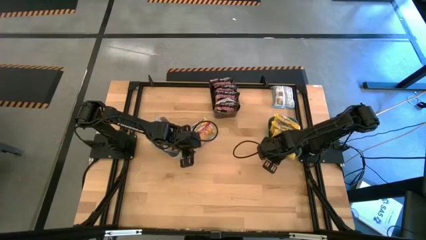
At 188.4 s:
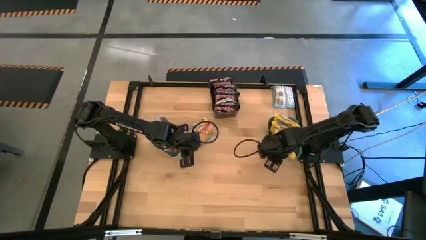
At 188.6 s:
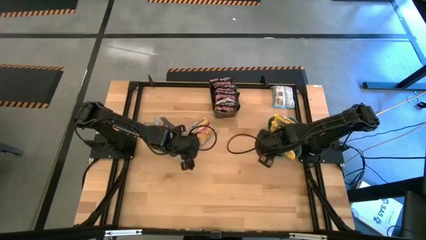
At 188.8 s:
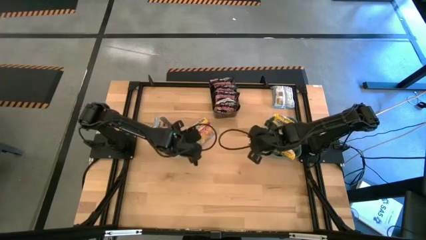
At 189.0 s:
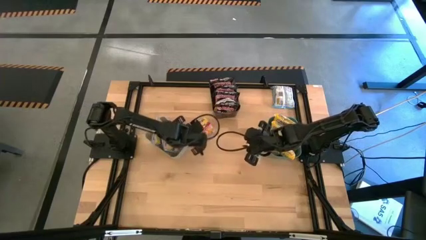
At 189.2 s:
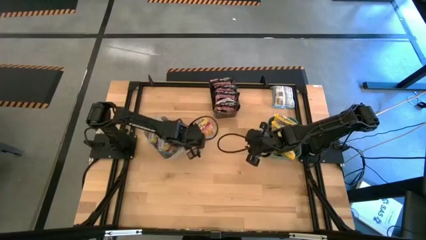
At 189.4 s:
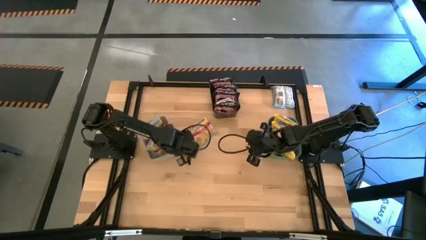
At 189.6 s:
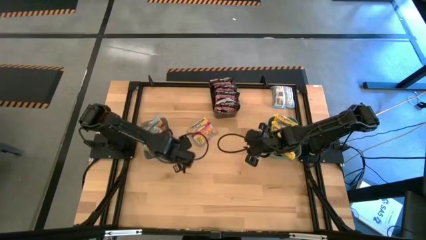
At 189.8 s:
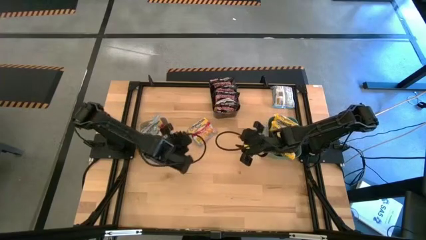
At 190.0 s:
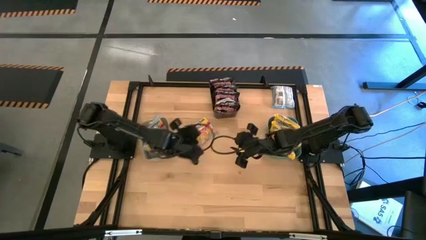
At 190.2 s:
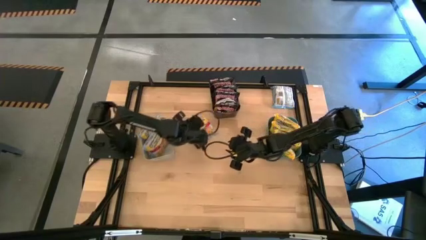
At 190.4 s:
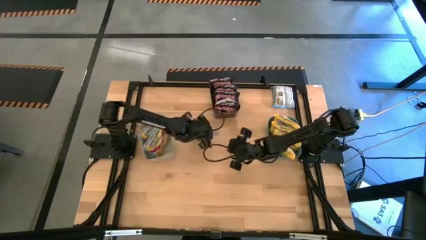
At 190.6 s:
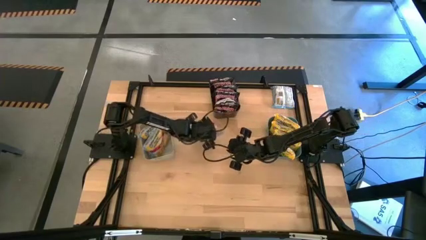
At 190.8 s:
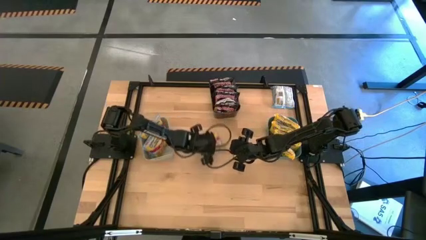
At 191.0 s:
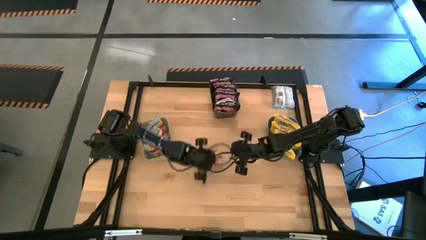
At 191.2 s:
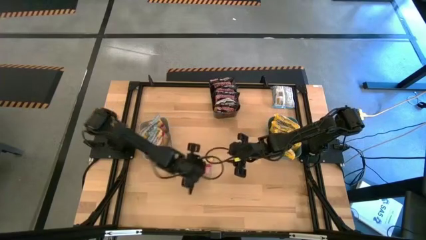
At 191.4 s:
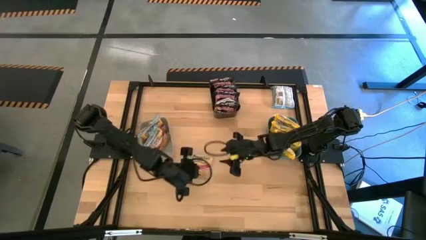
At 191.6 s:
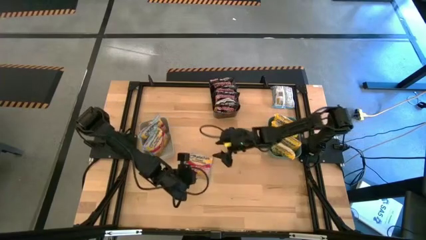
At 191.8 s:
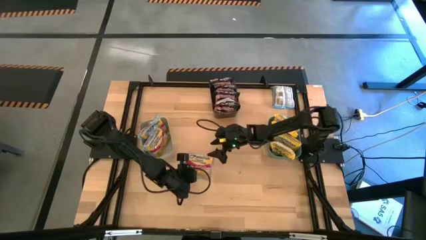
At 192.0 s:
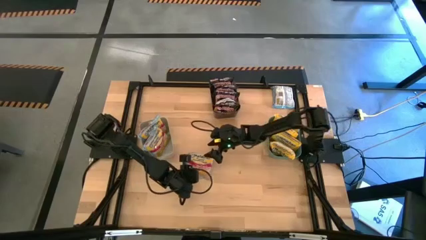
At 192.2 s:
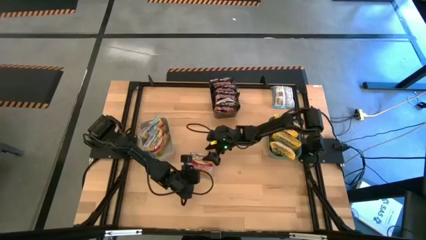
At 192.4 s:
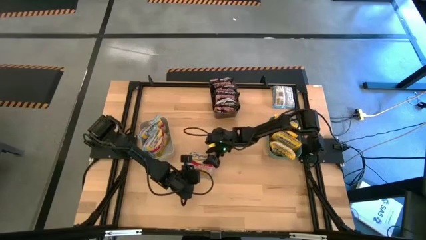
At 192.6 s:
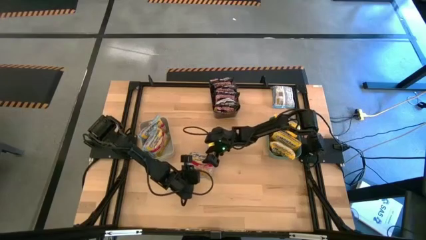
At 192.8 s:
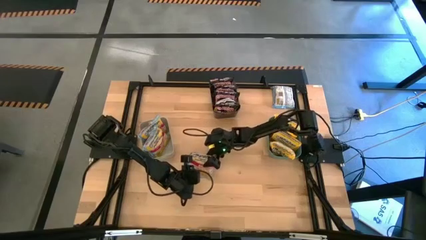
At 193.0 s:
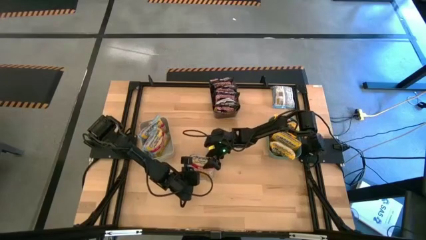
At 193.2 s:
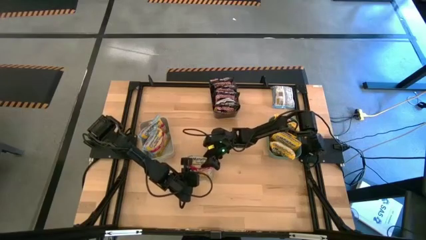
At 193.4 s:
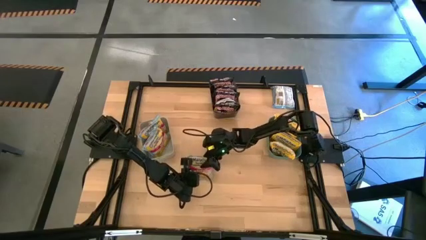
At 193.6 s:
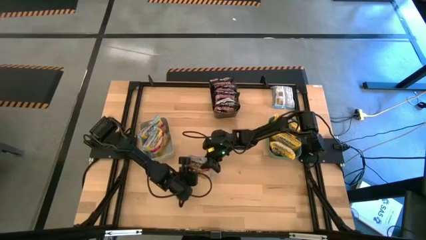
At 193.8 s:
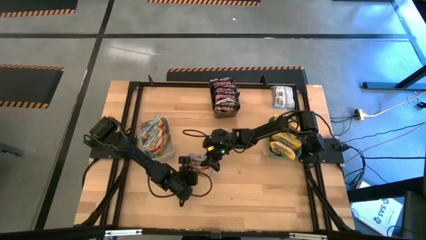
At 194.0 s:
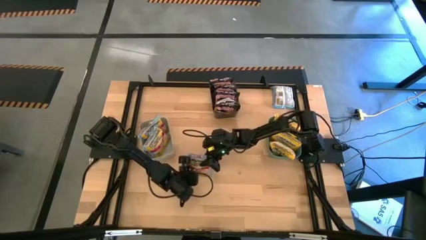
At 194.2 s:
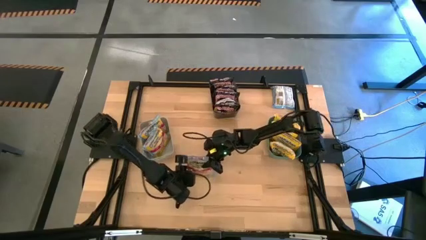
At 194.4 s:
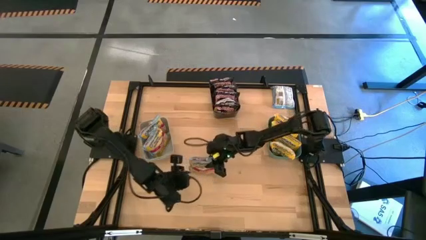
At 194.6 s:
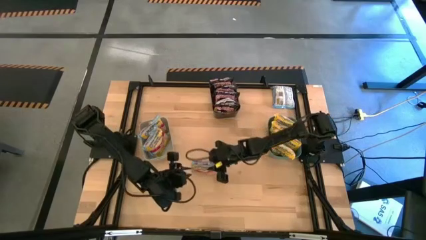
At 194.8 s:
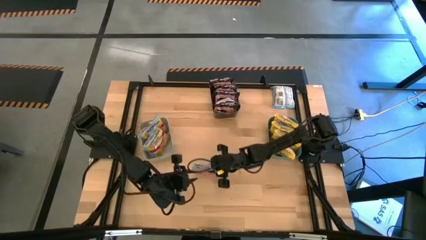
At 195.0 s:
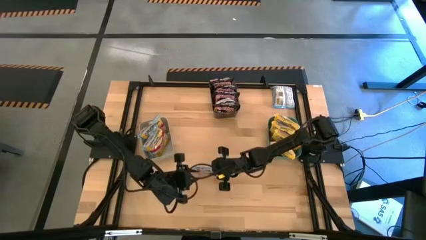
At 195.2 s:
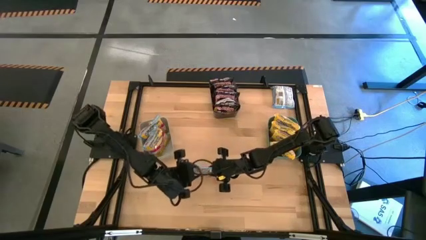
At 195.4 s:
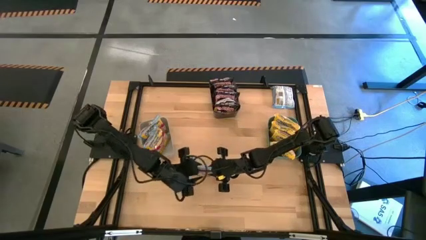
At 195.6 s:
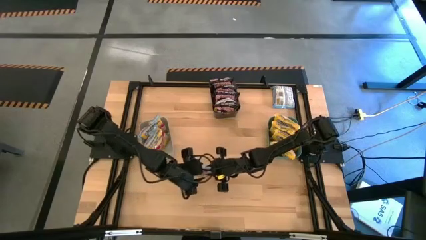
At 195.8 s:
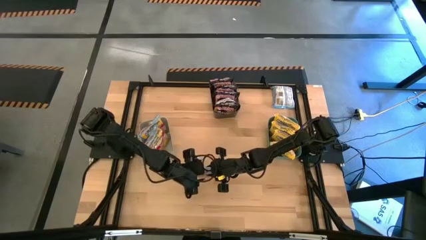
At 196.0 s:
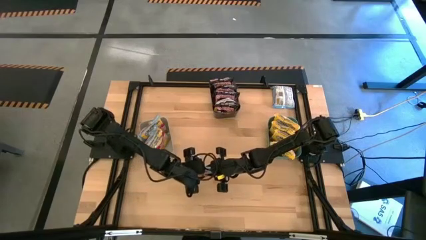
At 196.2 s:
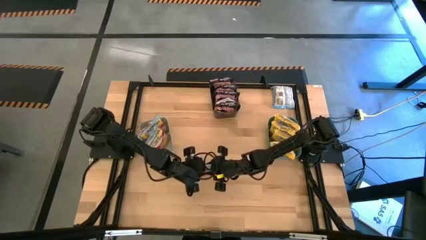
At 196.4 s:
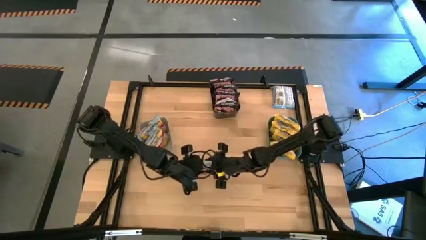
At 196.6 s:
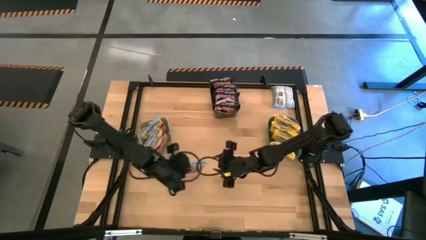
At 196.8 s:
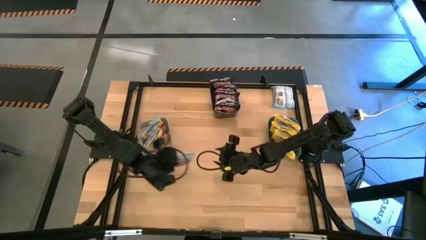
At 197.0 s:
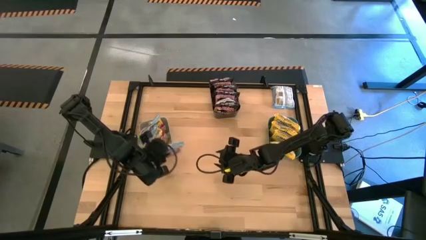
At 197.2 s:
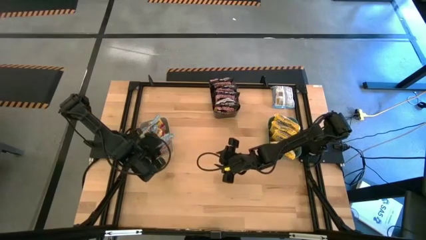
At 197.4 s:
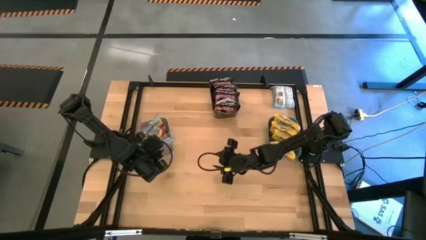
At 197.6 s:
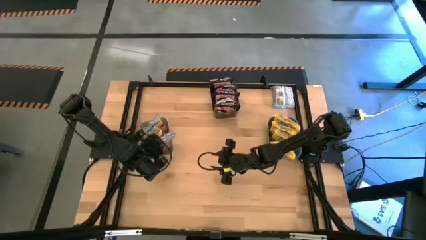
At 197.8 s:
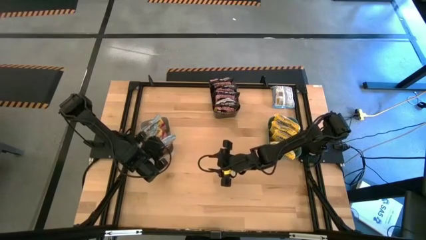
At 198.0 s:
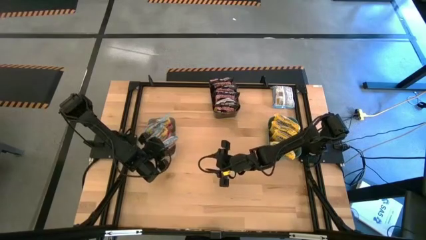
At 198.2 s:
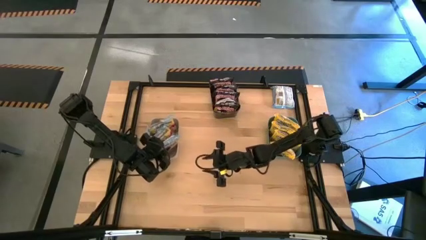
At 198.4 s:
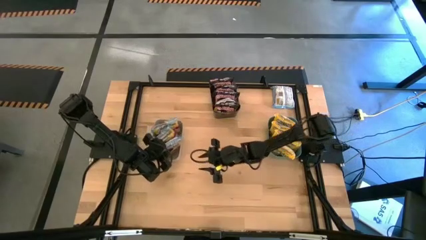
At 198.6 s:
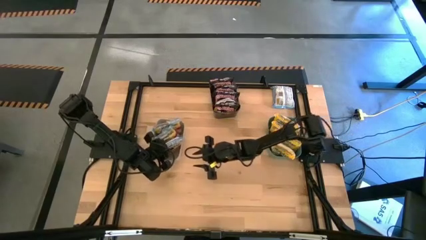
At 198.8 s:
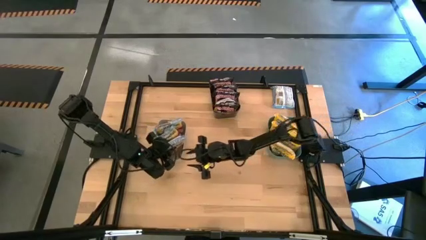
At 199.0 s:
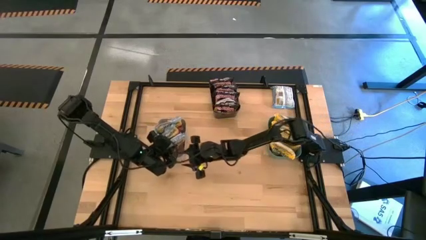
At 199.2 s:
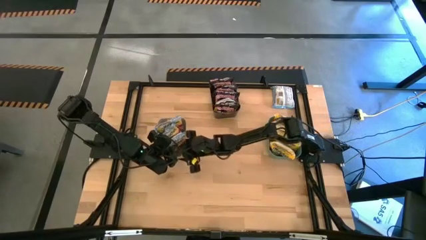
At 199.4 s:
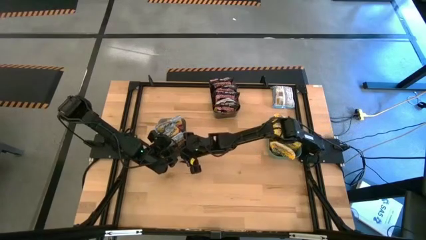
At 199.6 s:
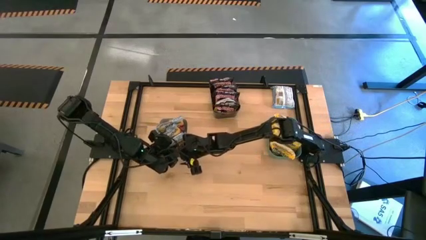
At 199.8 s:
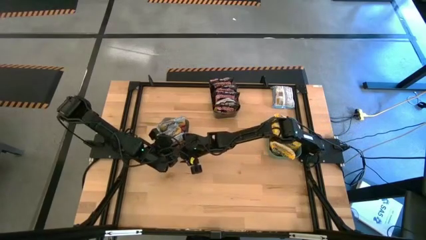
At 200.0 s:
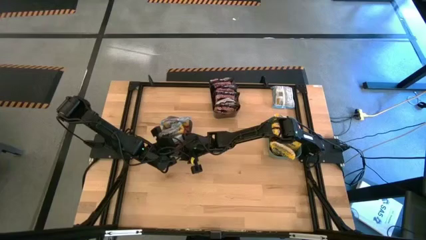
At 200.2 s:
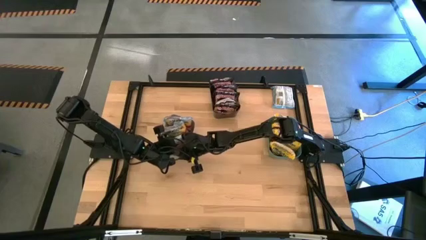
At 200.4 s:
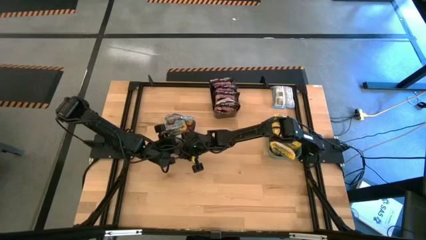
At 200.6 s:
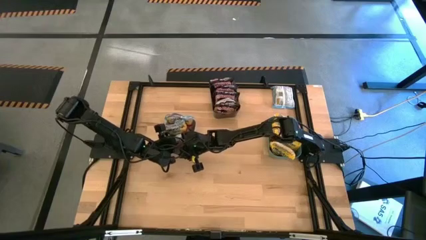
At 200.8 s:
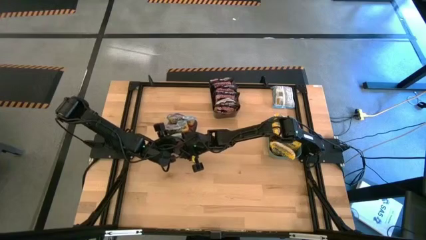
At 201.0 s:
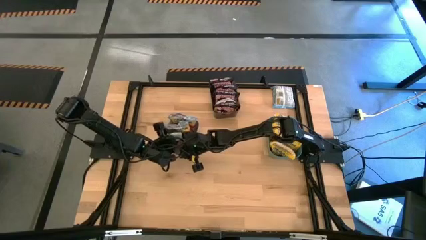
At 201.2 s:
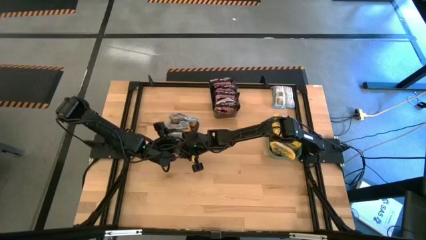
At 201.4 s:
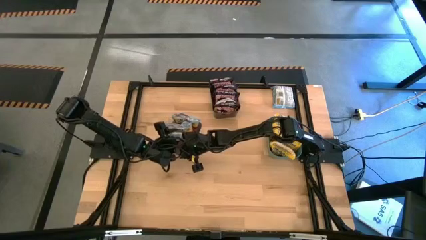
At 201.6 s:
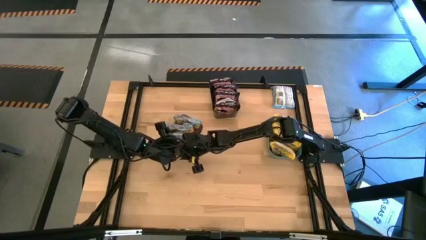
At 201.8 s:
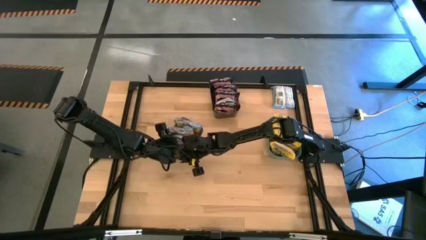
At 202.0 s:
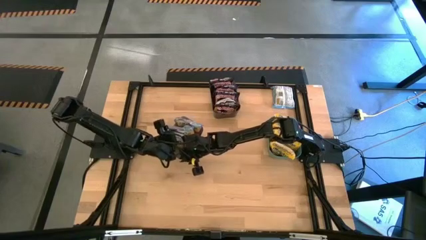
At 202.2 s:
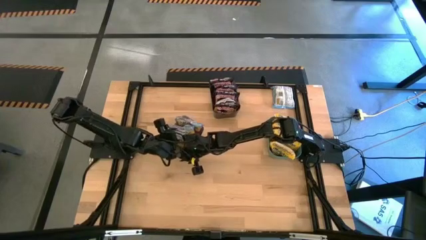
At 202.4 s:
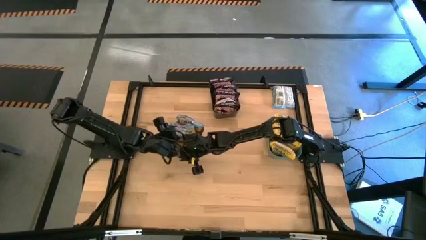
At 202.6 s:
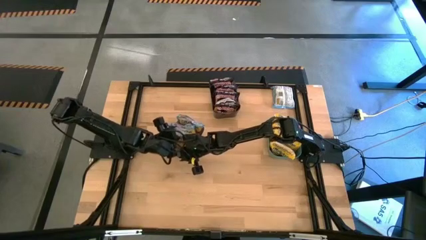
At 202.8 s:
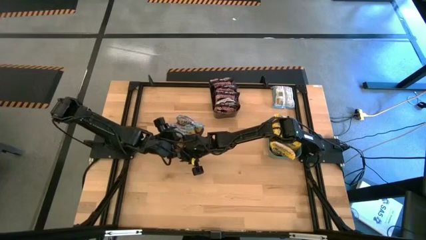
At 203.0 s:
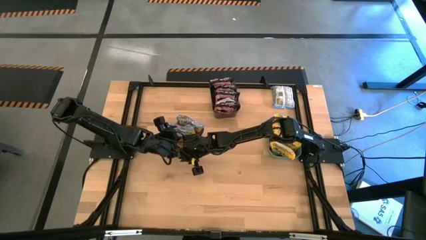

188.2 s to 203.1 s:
Task: Sort Maruchan noodles
Put the blue noodle pack into the gray bin
